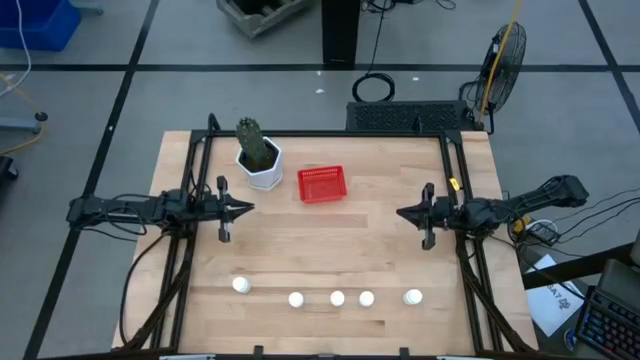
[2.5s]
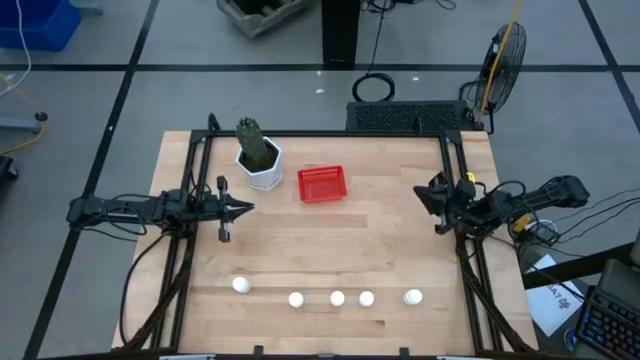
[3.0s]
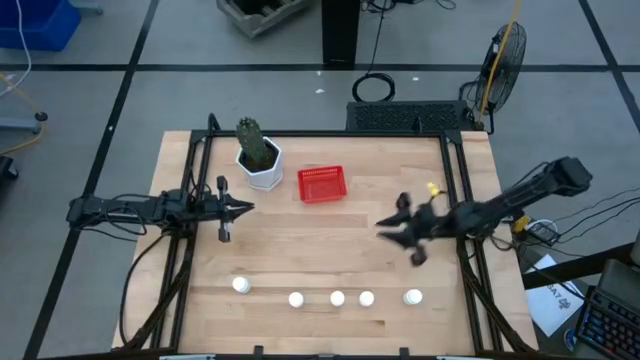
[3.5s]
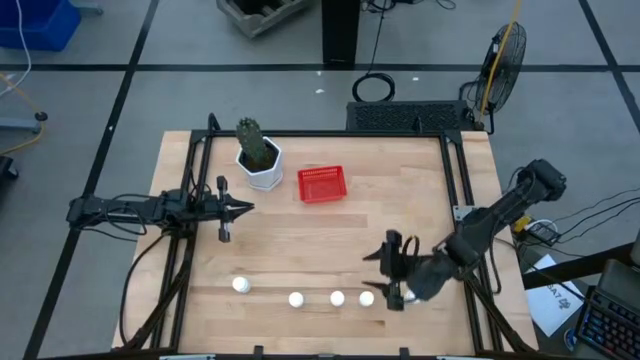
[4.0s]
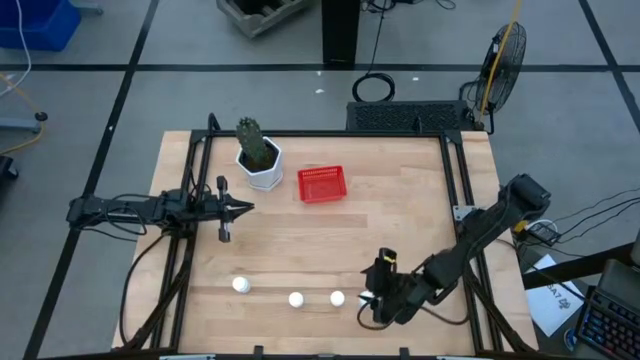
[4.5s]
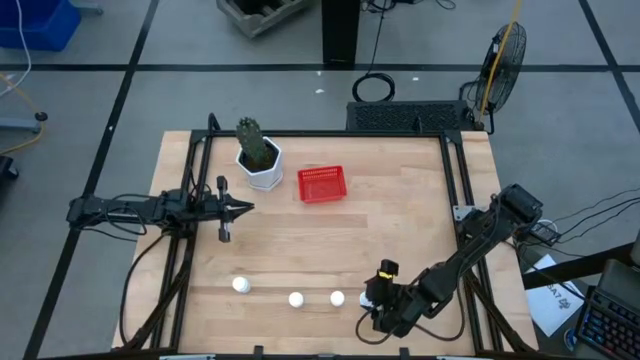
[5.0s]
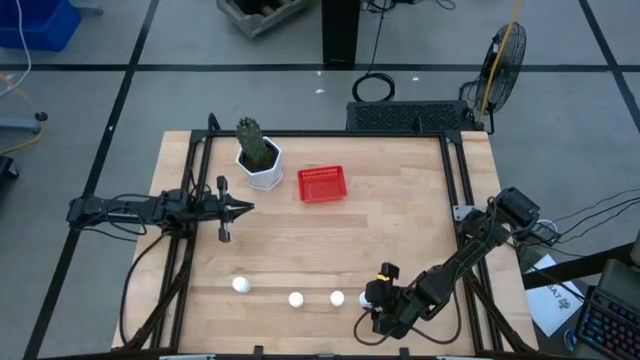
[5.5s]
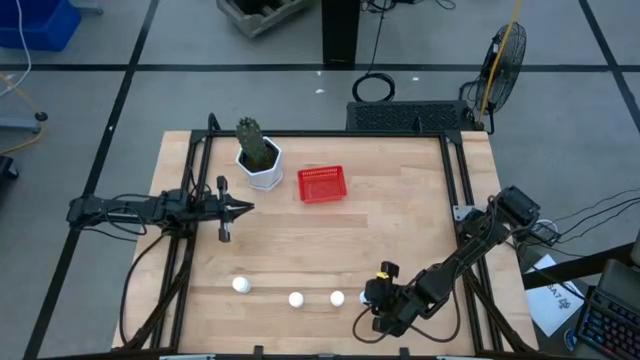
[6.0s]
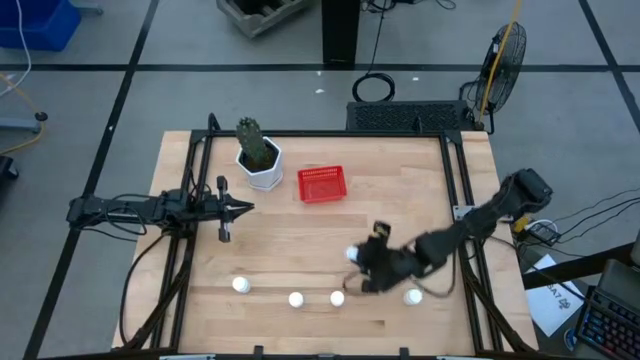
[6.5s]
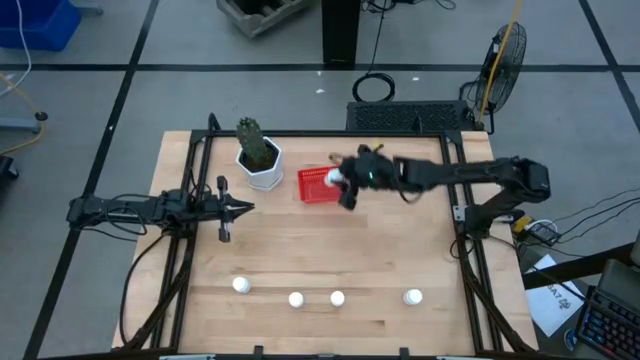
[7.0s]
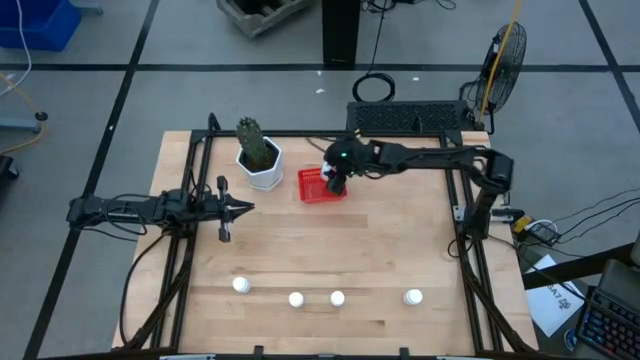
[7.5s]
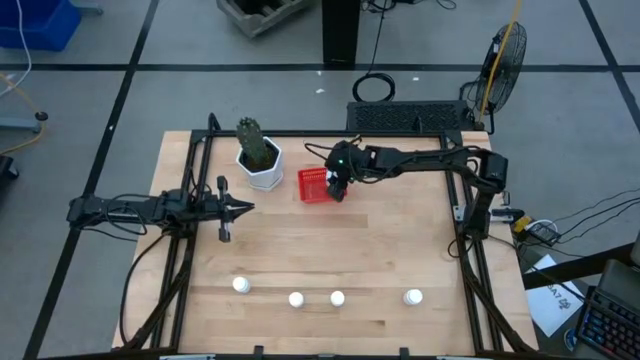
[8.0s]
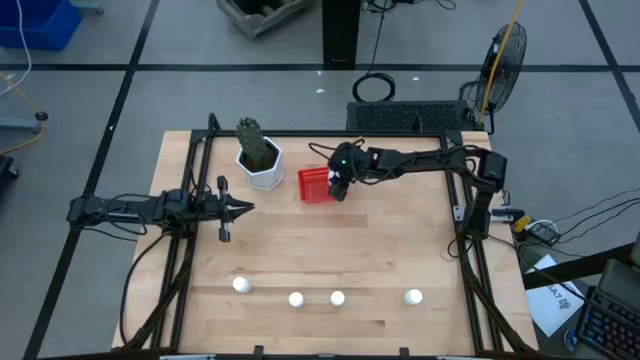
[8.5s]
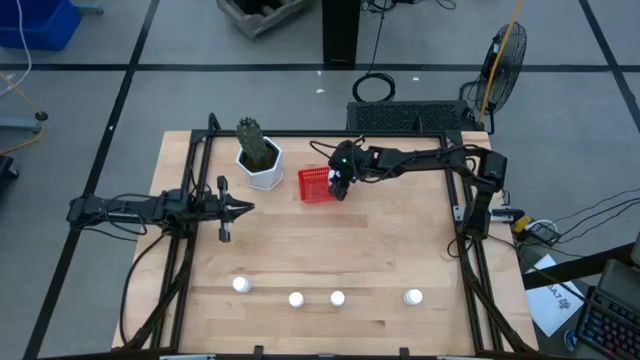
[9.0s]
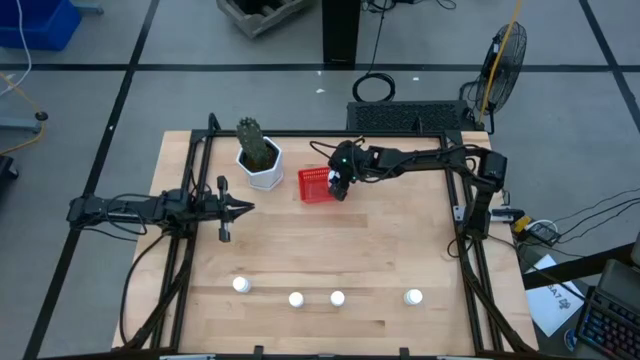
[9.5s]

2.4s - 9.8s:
Task: Pick and place pill bottles into a basket
Put the white pill bottle into the red bin

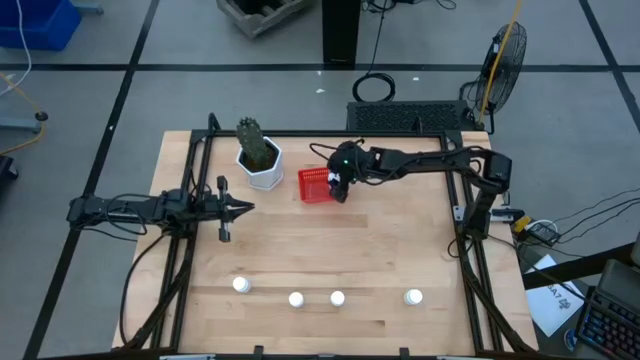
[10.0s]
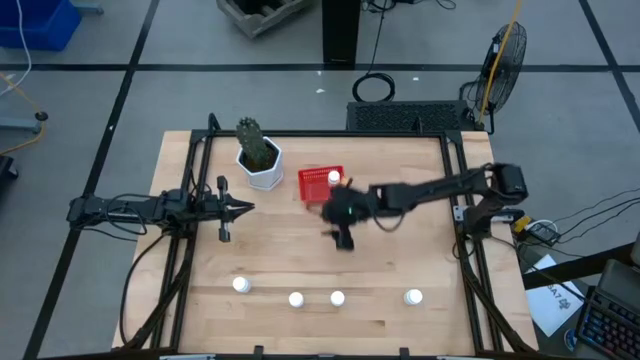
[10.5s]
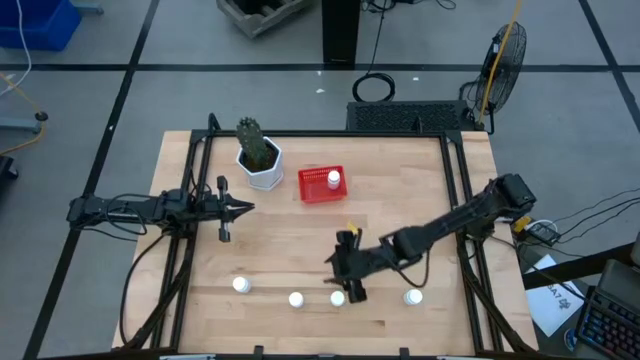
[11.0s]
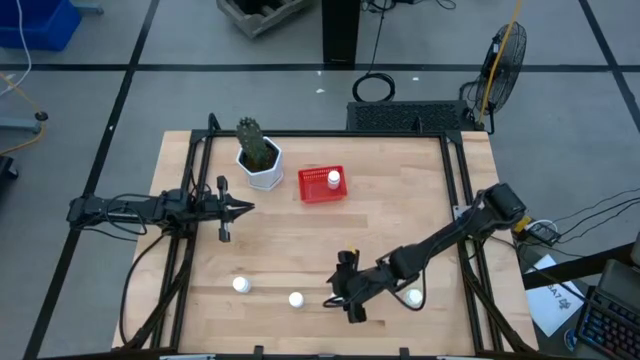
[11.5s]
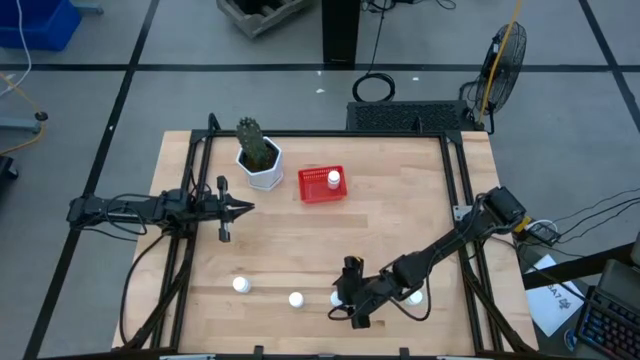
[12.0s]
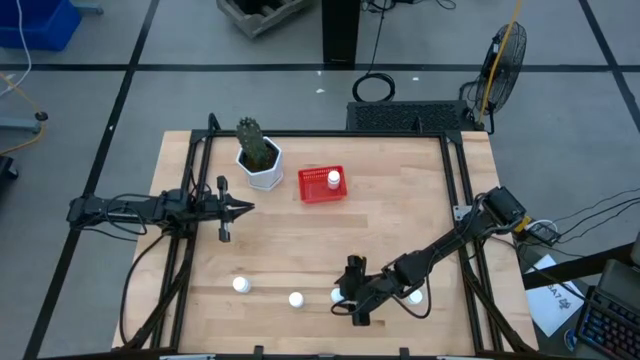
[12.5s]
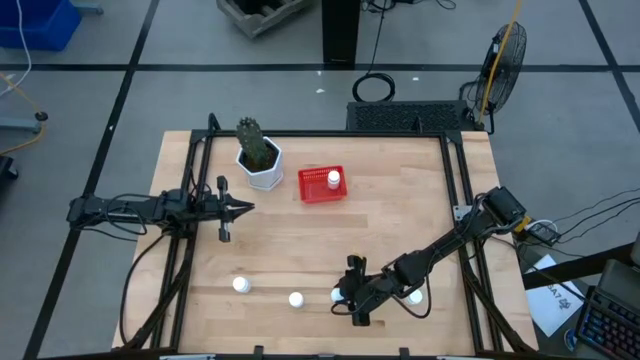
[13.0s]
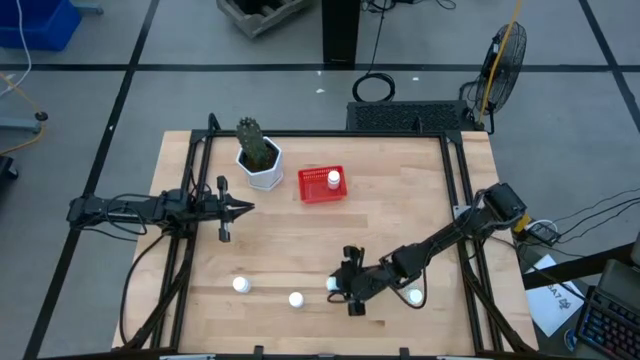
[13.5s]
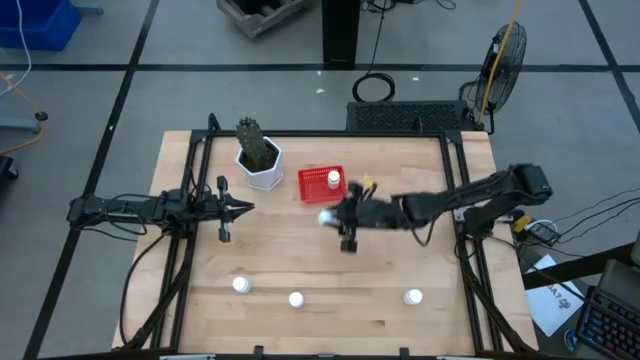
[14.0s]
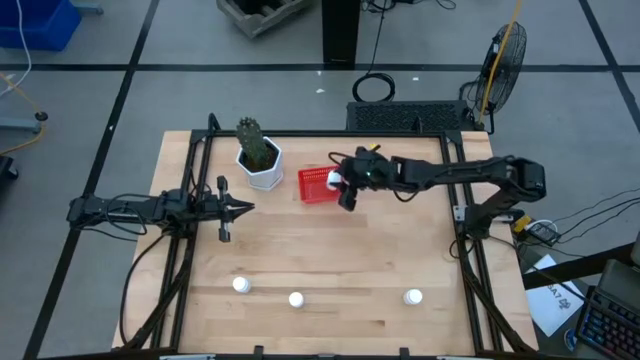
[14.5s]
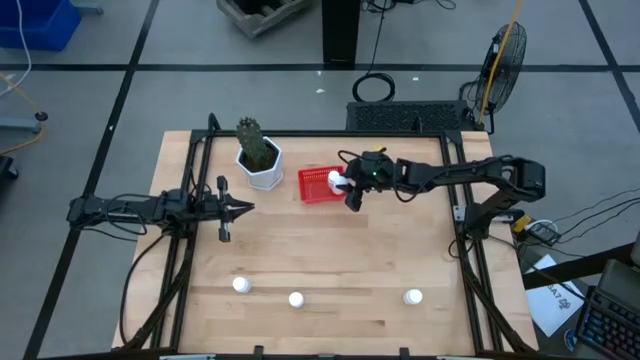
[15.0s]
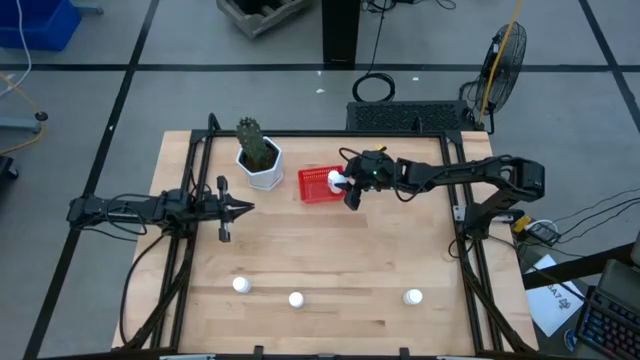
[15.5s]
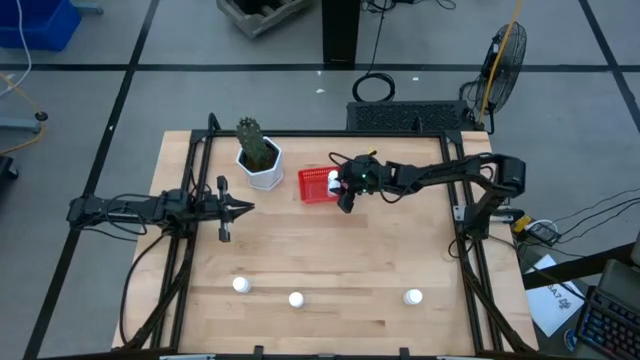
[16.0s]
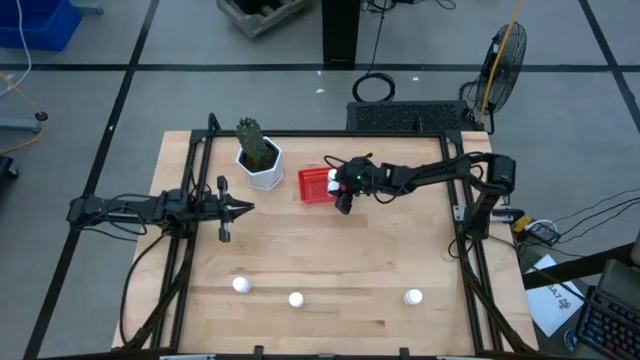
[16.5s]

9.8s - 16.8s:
Put the white pill bottle into the red bin

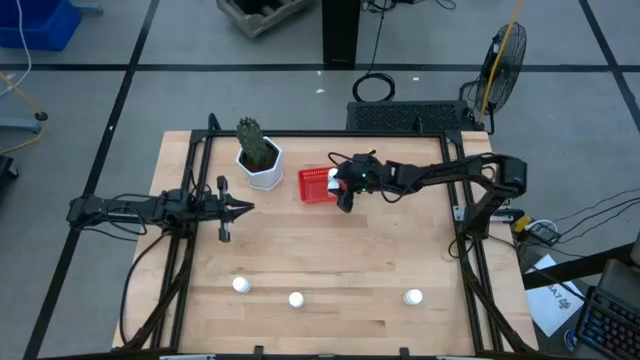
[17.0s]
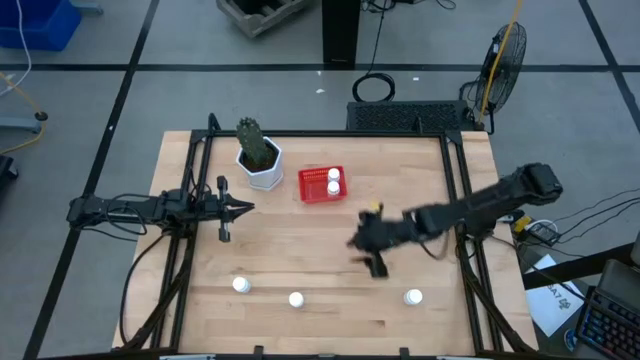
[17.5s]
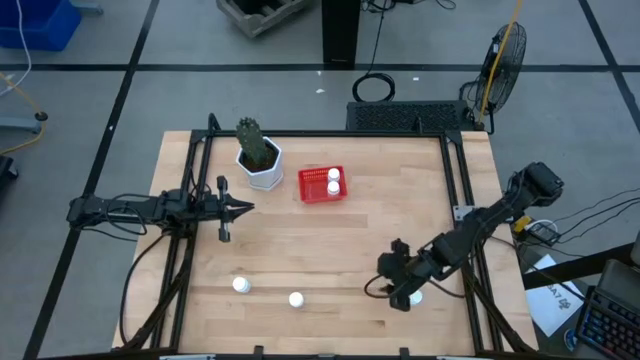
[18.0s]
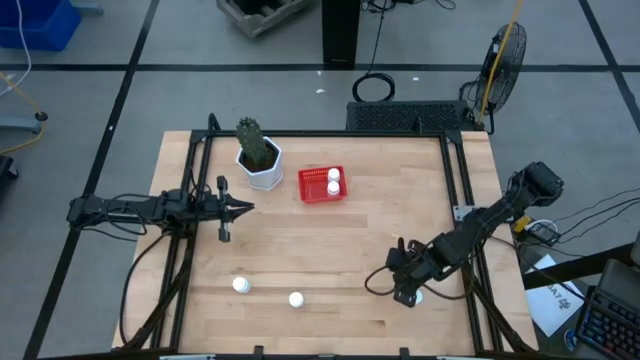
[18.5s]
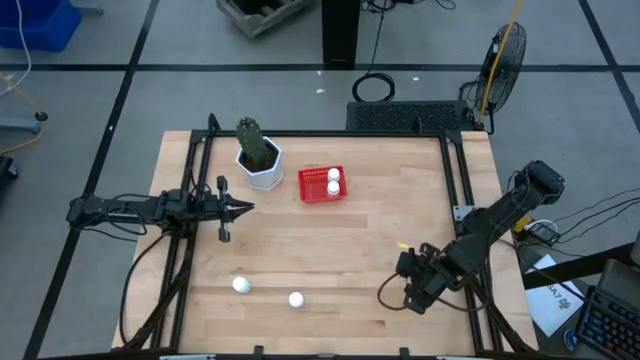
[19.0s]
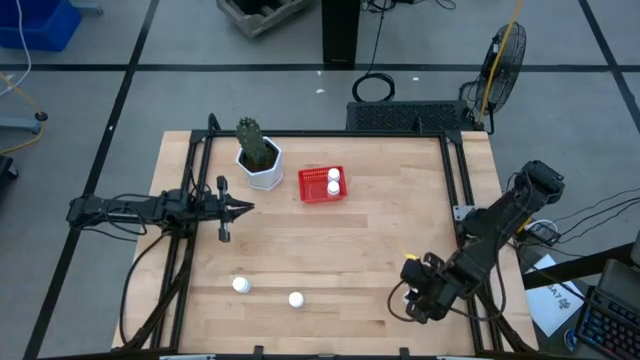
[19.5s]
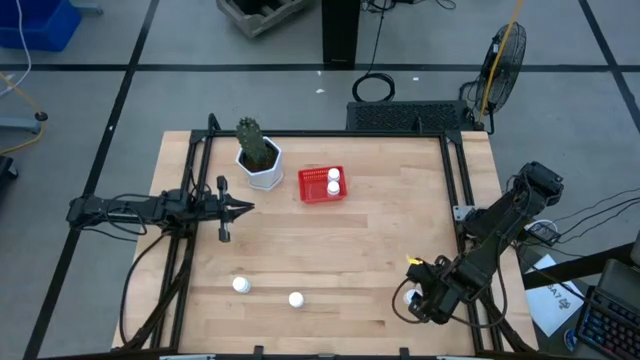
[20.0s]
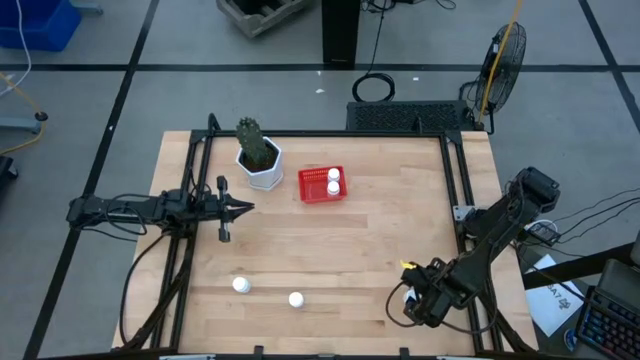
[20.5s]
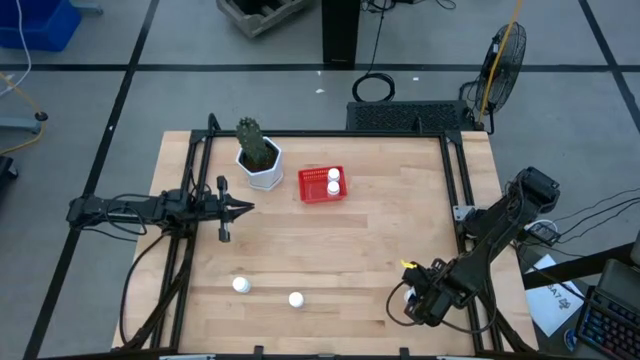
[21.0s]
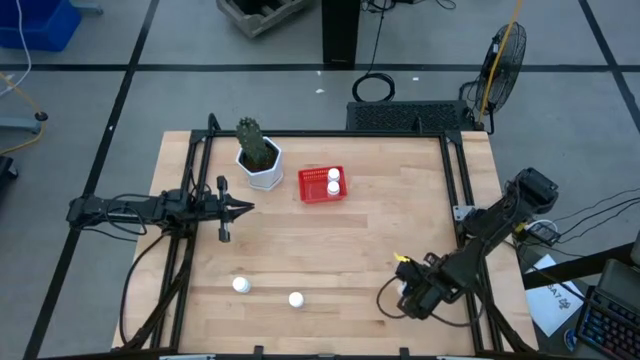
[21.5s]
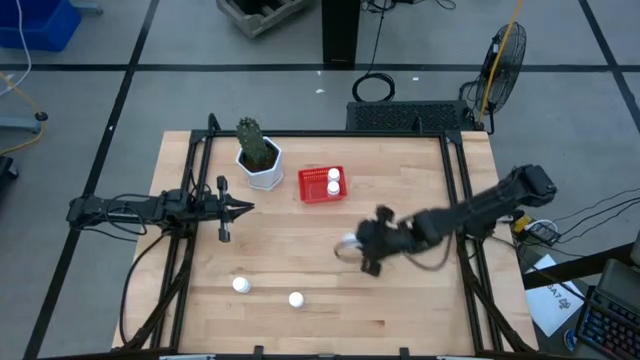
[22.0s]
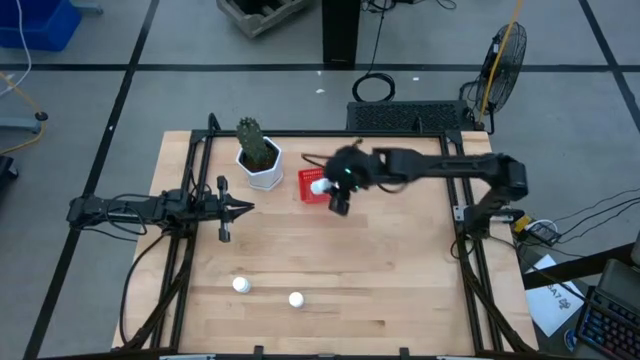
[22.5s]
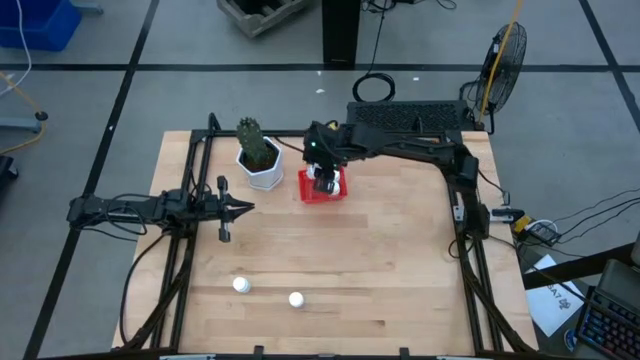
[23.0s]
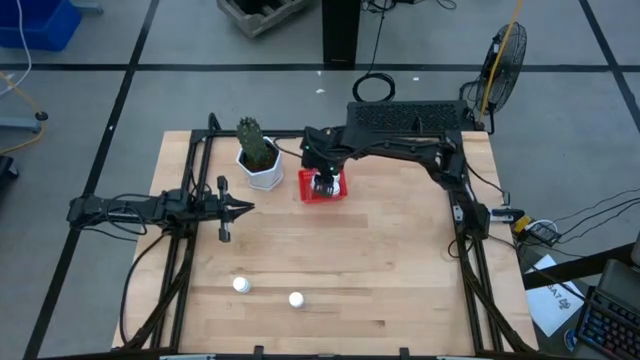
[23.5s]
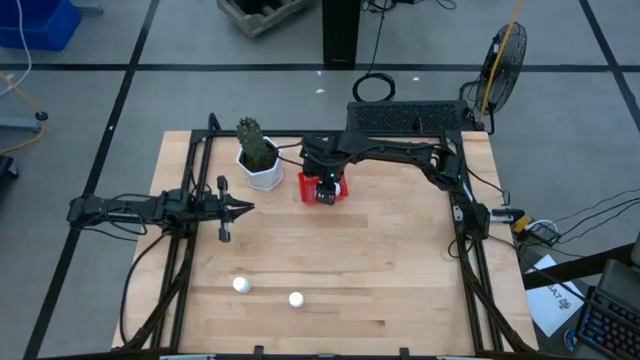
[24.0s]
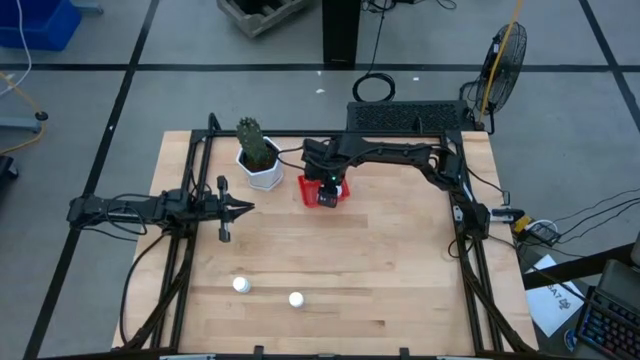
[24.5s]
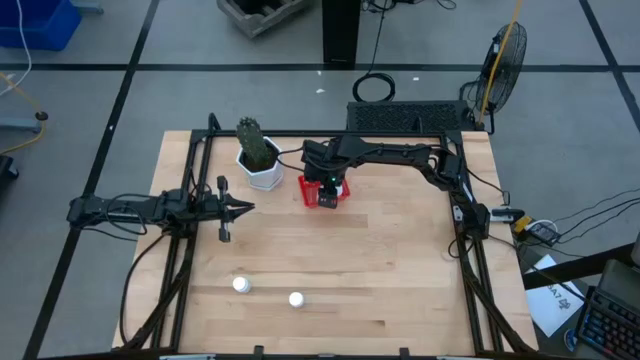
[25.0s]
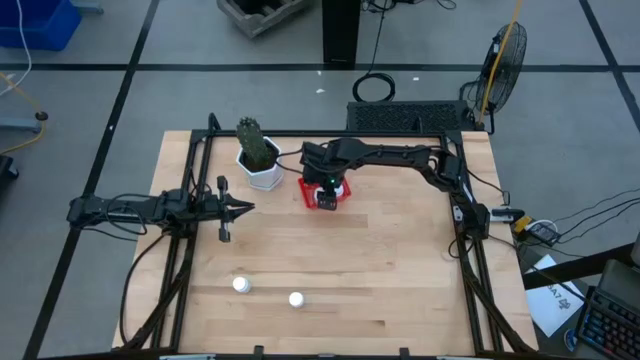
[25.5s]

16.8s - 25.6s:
Put the white pill bottle into the red bin
